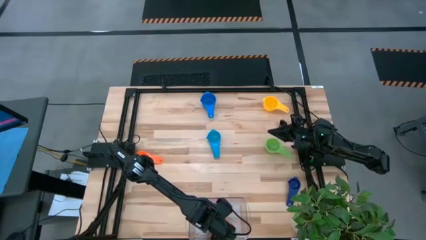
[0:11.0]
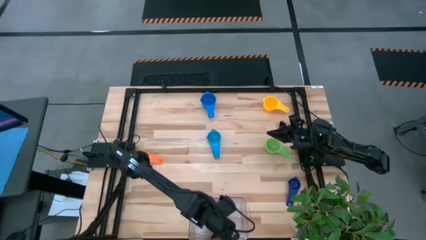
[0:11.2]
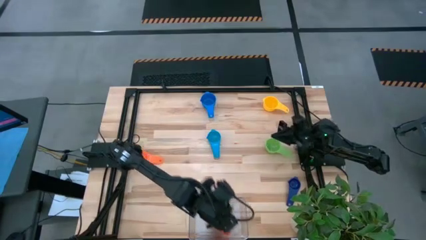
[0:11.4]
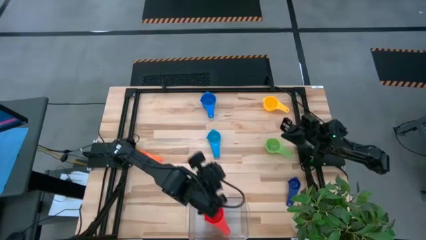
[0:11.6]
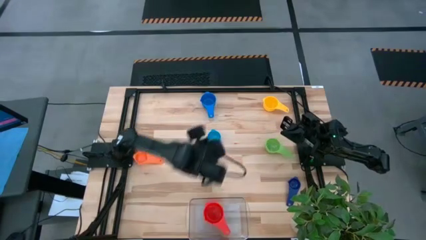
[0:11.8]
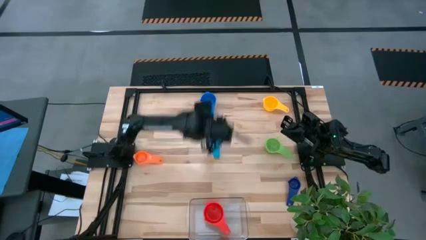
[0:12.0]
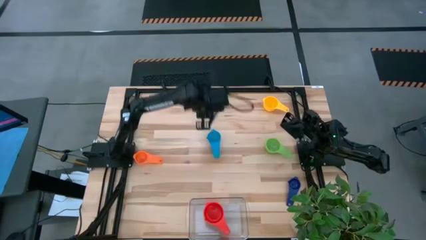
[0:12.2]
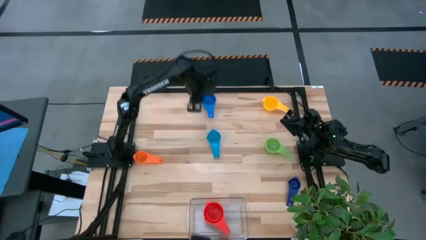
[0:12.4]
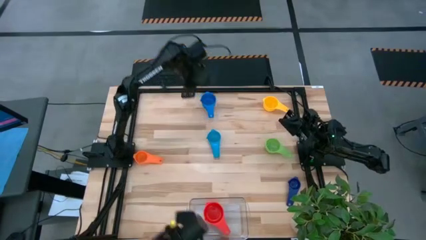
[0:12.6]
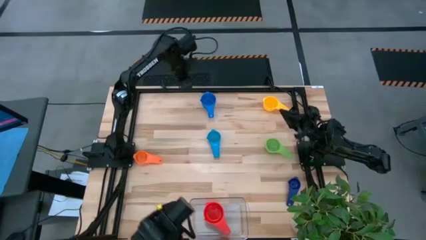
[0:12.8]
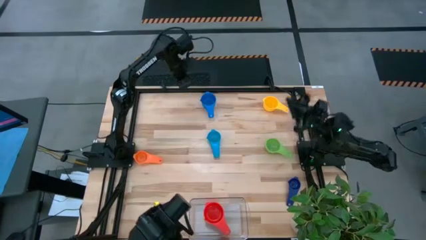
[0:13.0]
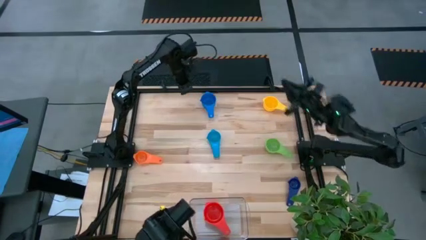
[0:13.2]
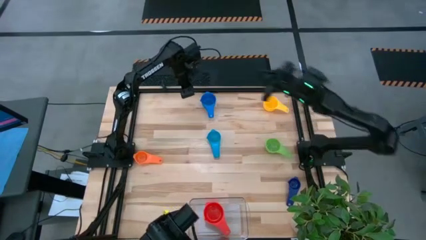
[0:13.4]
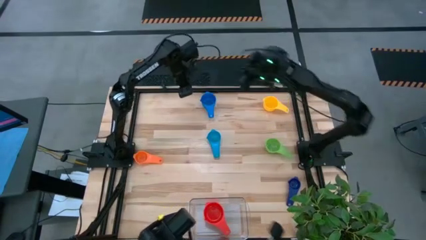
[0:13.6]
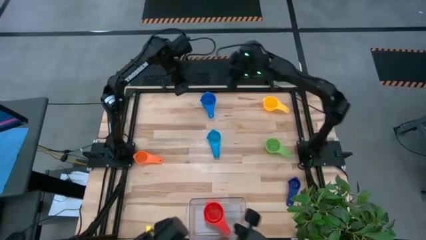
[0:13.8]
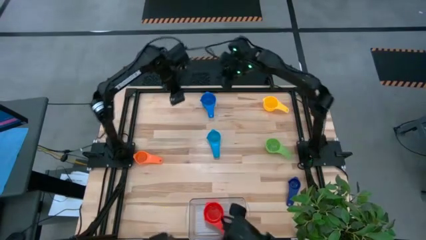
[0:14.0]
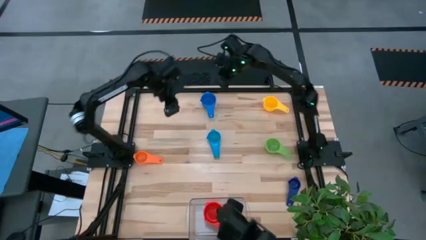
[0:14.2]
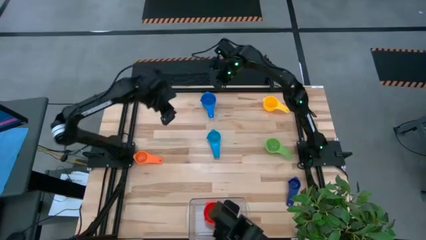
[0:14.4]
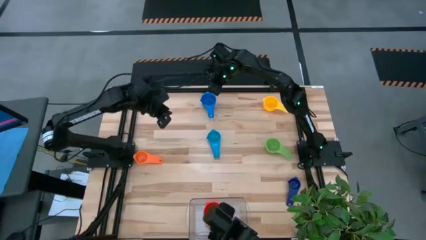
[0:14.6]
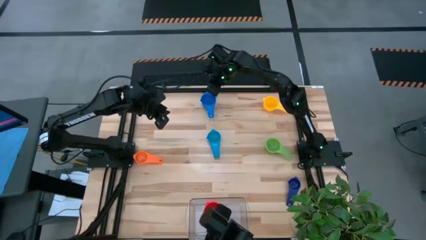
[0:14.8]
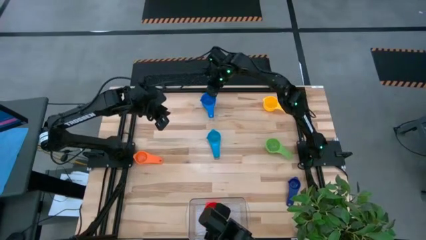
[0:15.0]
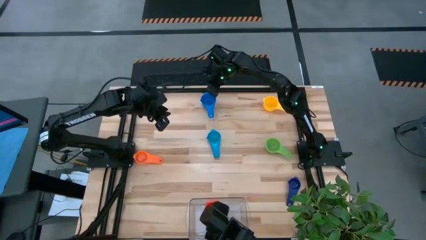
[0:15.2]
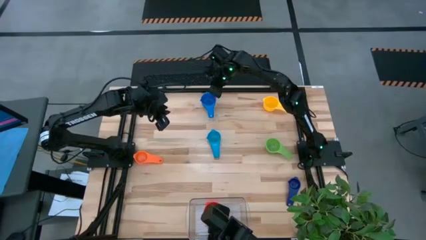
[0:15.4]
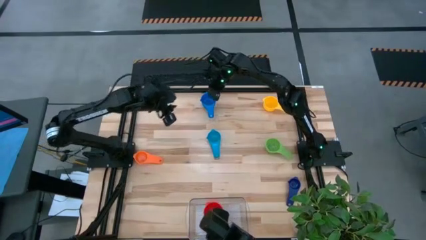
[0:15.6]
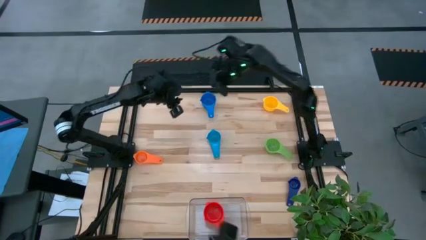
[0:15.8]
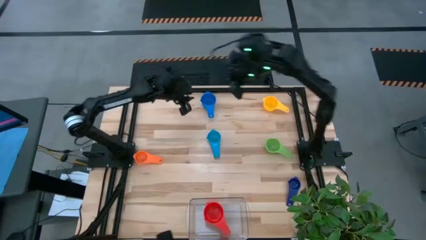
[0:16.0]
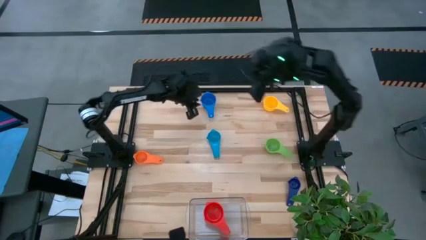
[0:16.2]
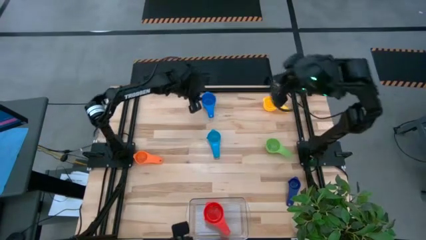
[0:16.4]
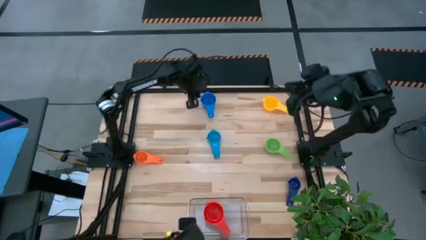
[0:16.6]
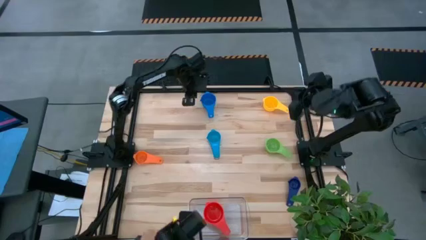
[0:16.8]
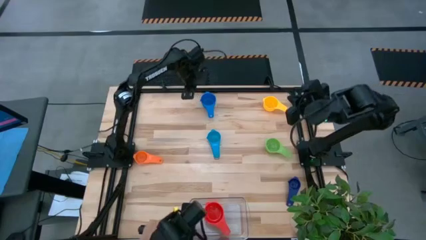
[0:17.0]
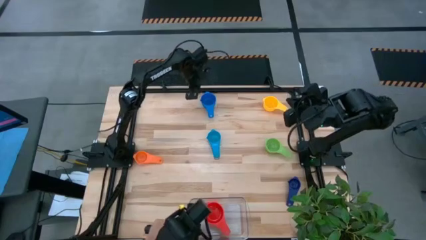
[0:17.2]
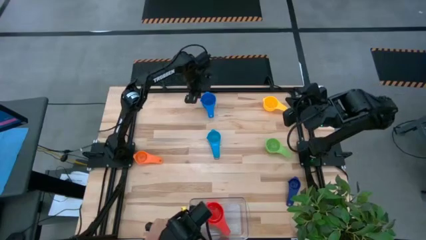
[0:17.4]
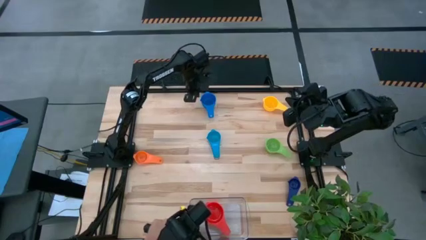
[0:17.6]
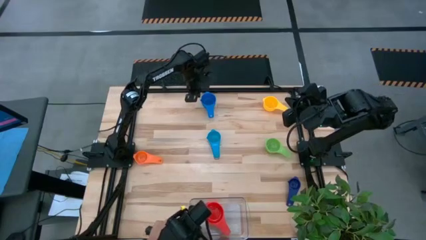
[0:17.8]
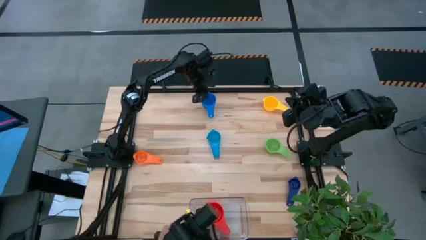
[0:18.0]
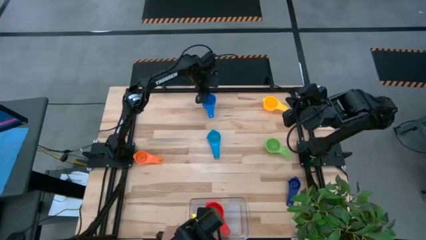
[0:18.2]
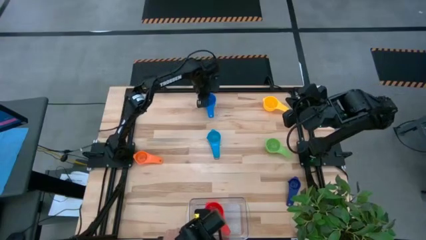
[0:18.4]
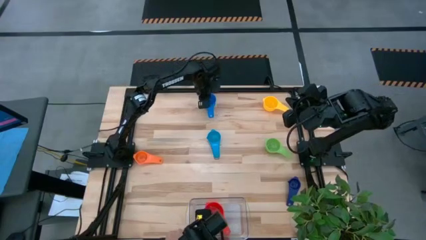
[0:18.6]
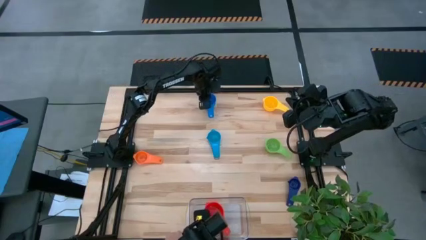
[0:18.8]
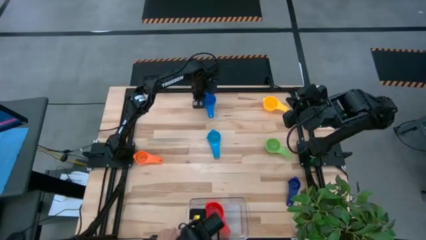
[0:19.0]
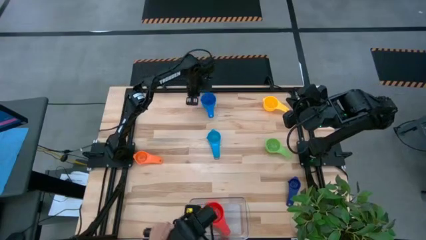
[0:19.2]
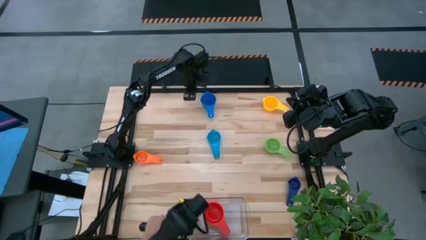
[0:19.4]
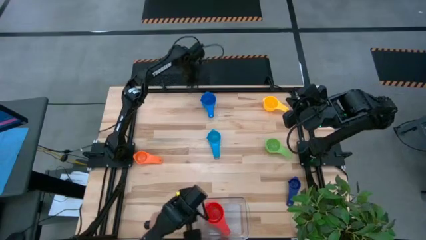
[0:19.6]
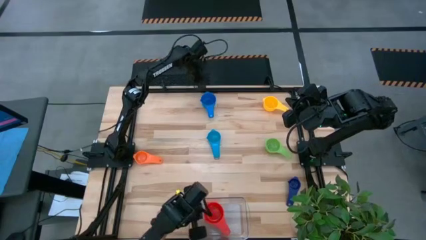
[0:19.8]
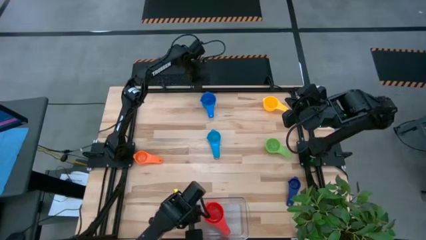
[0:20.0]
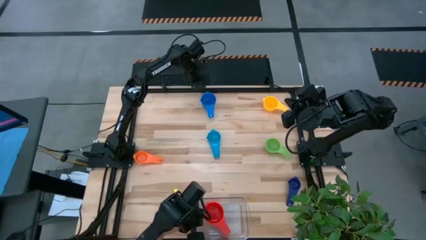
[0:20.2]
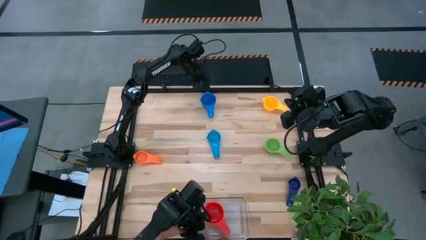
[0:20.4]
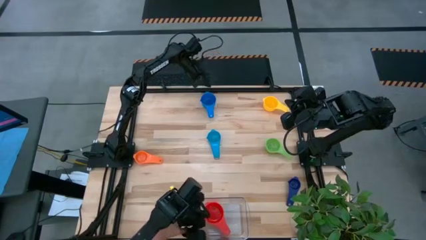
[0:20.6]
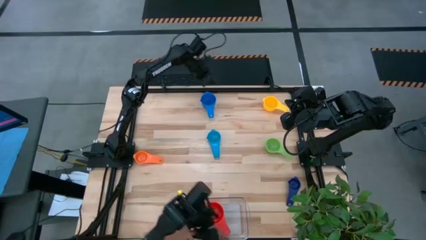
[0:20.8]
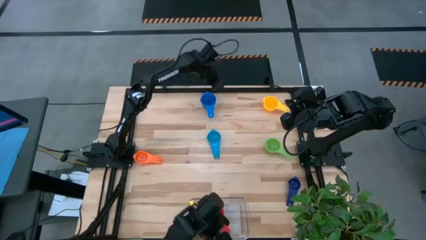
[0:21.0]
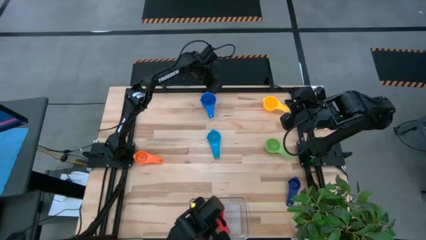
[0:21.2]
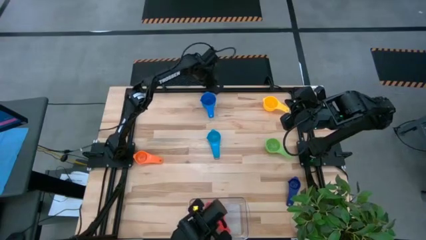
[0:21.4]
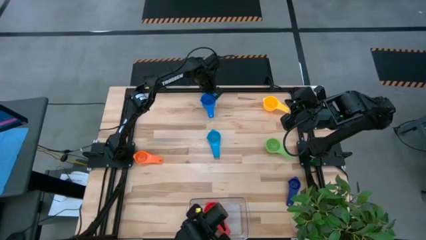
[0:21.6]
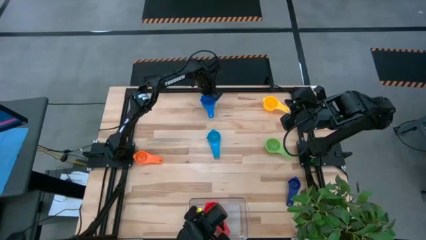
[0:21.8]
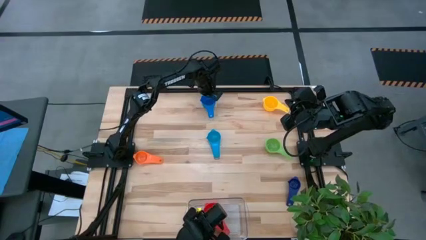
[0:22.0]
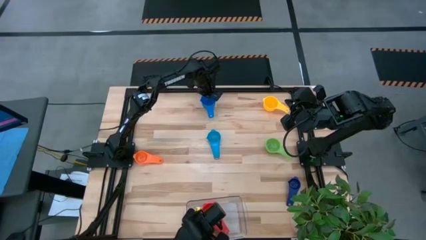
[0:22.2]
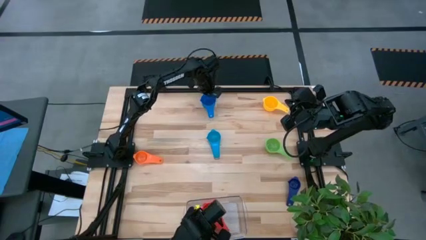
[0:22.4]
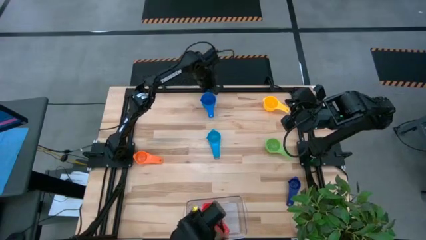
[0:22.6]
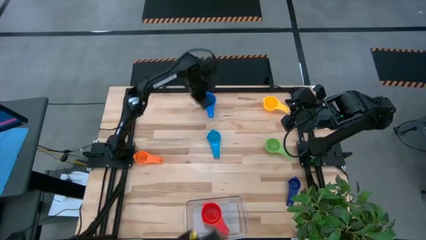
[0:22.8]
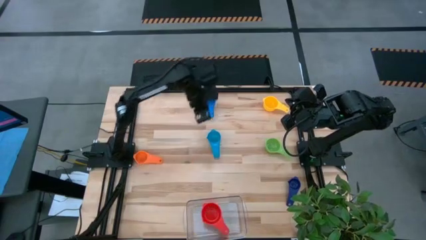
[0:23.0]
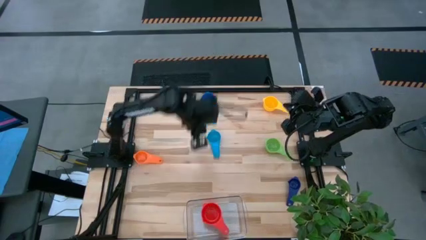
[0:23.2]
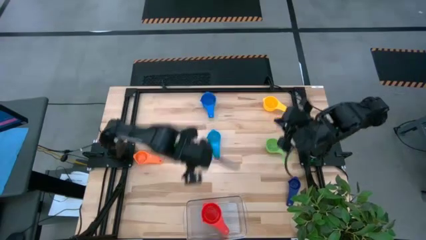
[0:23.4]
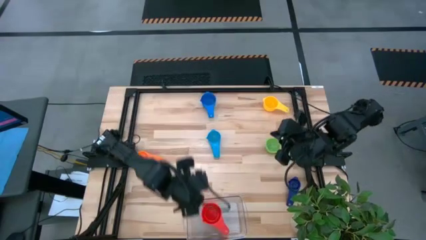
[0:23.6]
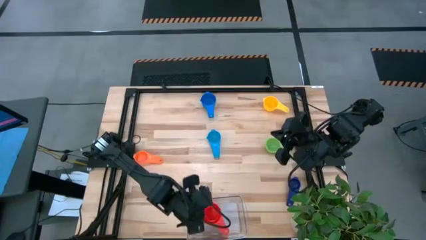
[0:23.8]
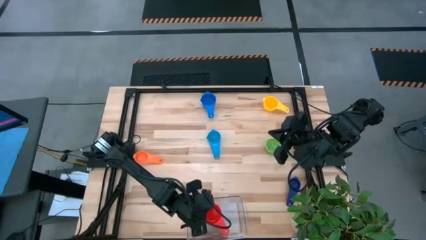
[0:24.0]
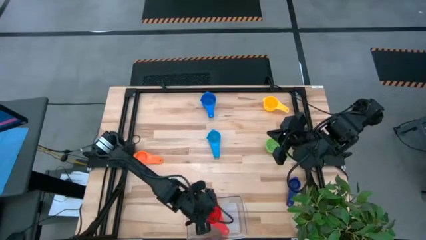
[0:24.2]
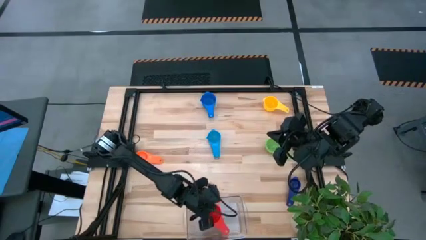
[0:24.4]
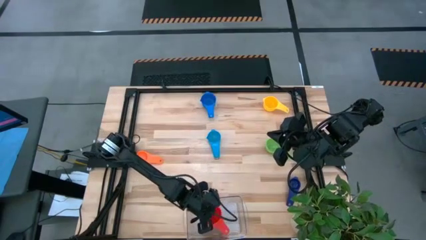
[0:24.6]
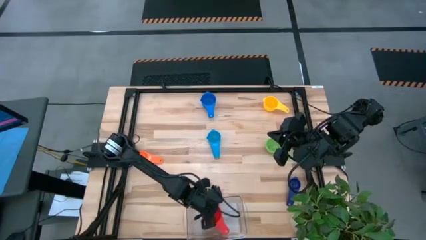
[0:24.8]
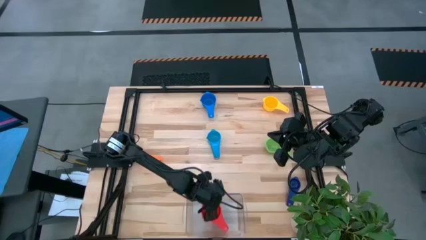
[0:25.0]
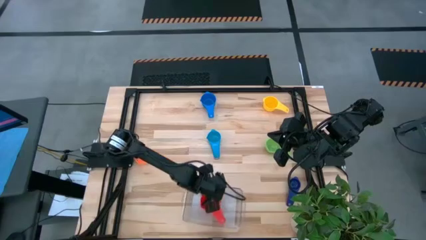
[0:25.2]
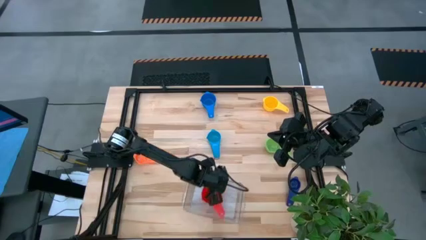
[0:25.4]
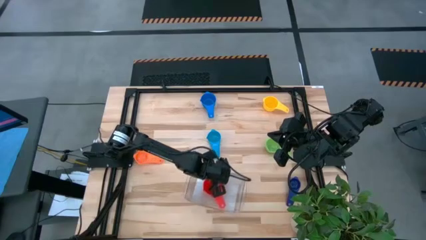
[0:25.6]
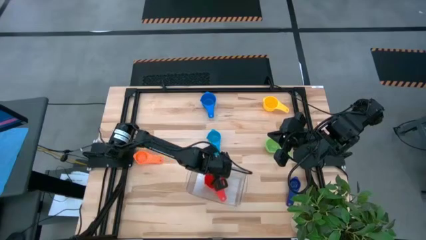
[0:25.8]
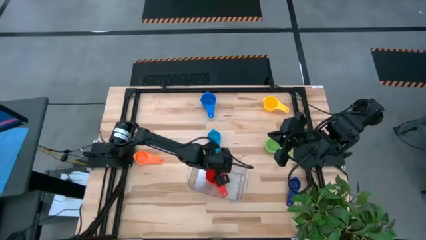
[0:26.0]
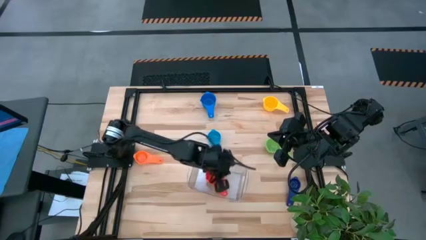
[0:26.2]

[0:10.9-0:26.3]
Task: Nest measuring cups in basket
Adjust the transparent bin
